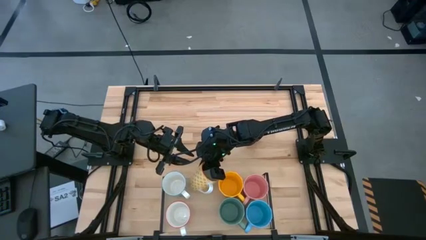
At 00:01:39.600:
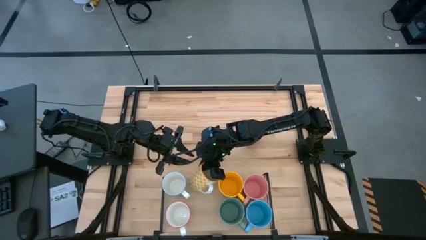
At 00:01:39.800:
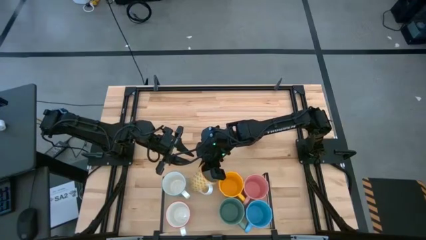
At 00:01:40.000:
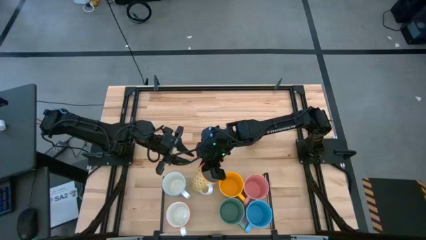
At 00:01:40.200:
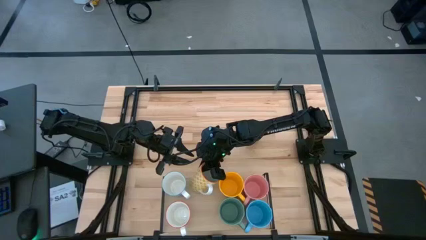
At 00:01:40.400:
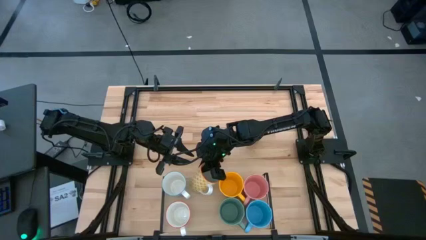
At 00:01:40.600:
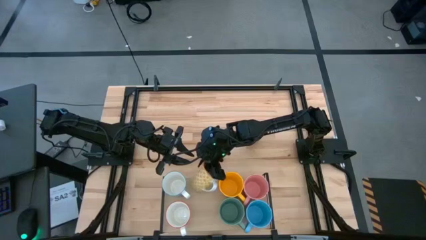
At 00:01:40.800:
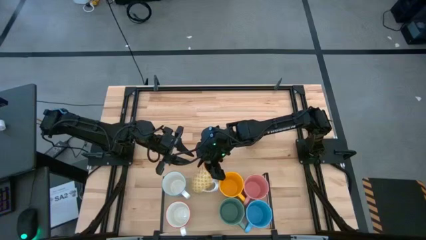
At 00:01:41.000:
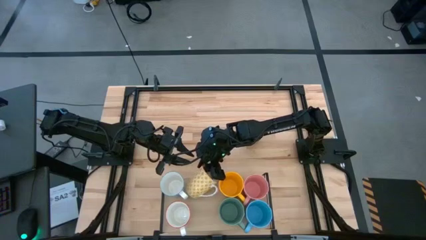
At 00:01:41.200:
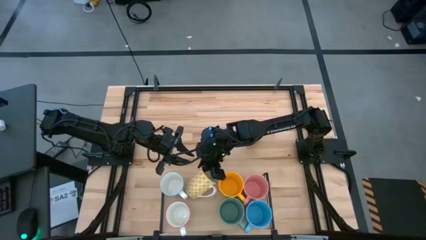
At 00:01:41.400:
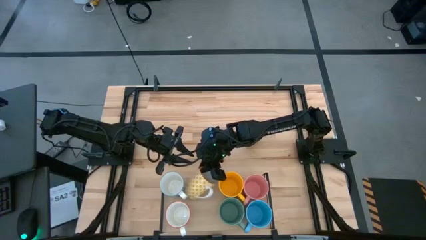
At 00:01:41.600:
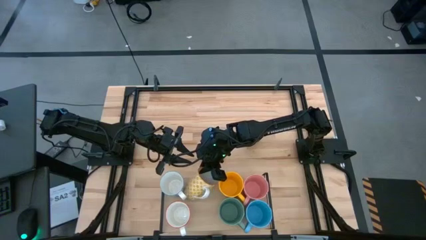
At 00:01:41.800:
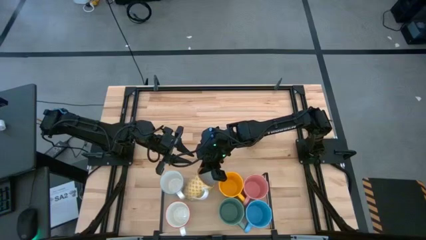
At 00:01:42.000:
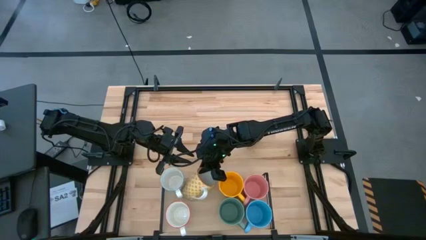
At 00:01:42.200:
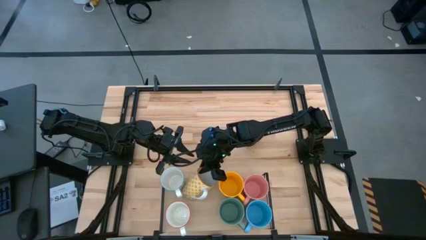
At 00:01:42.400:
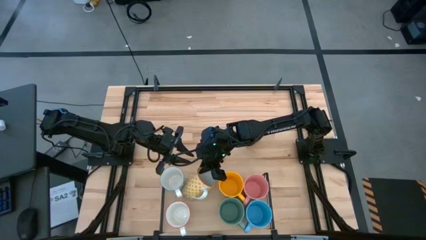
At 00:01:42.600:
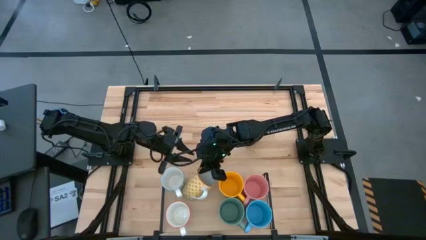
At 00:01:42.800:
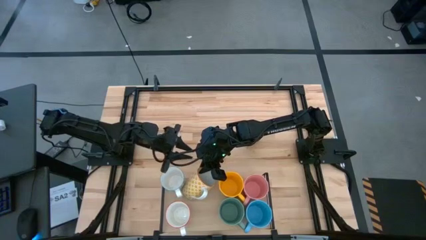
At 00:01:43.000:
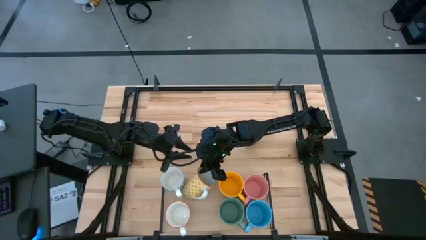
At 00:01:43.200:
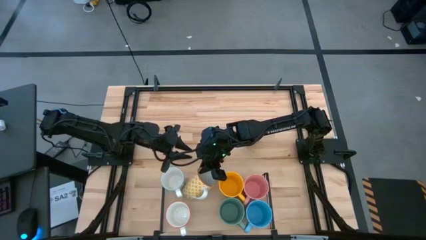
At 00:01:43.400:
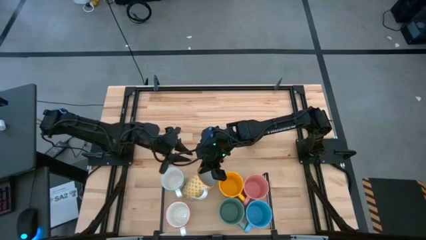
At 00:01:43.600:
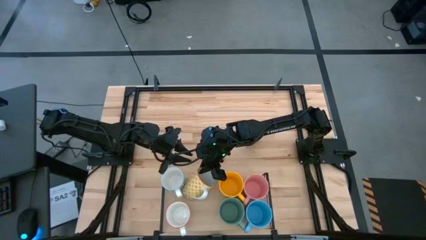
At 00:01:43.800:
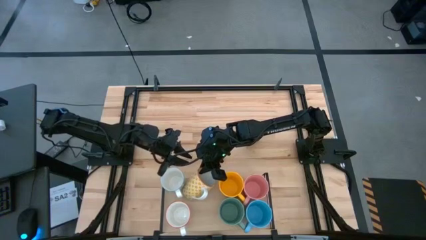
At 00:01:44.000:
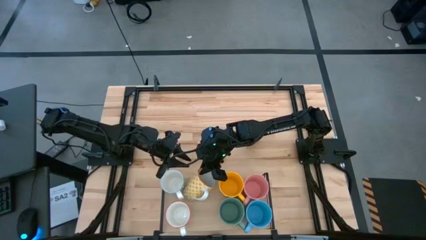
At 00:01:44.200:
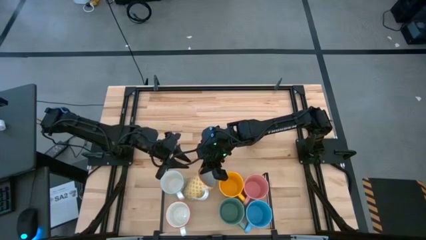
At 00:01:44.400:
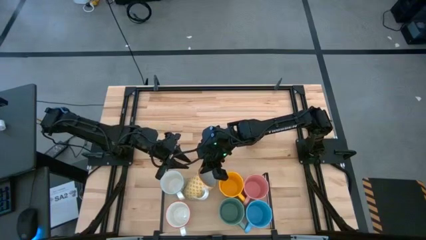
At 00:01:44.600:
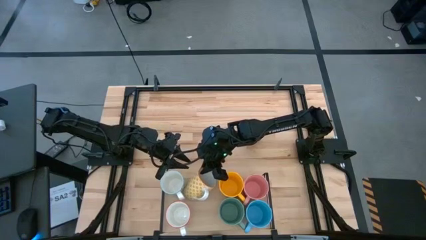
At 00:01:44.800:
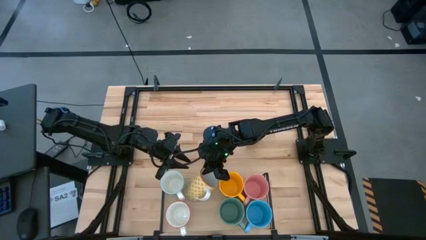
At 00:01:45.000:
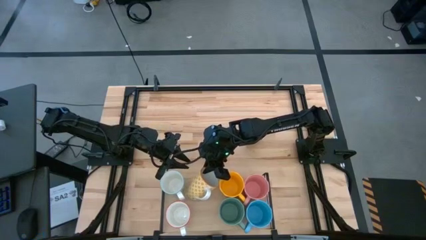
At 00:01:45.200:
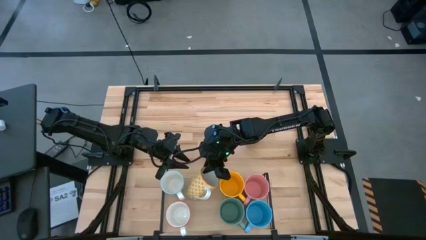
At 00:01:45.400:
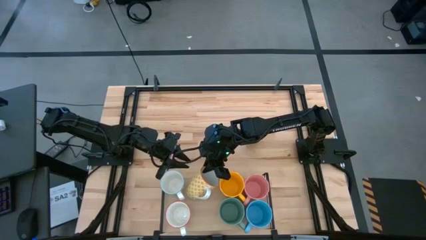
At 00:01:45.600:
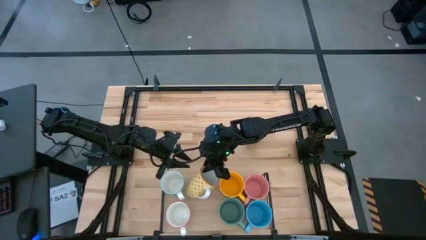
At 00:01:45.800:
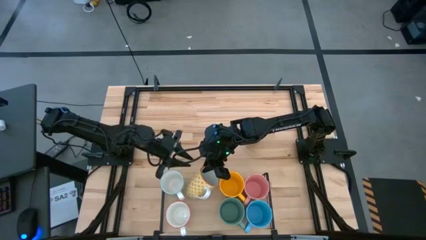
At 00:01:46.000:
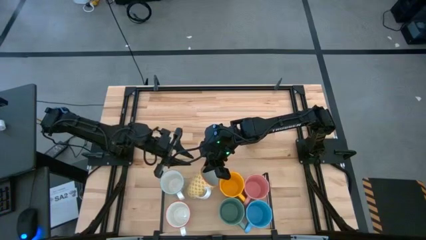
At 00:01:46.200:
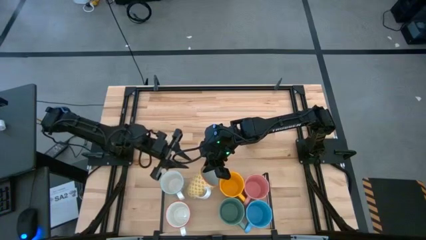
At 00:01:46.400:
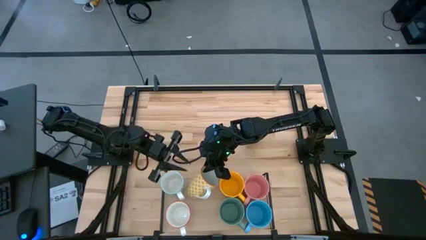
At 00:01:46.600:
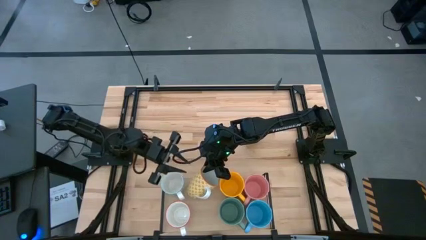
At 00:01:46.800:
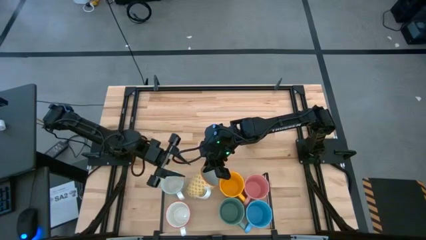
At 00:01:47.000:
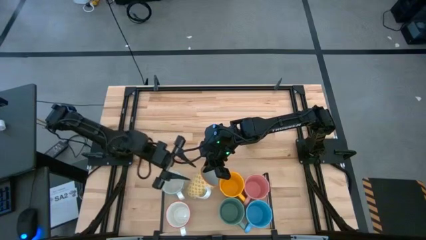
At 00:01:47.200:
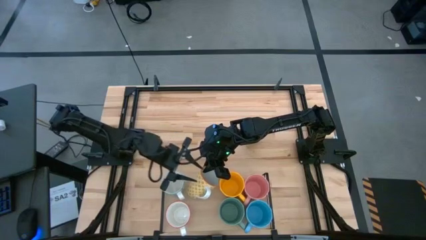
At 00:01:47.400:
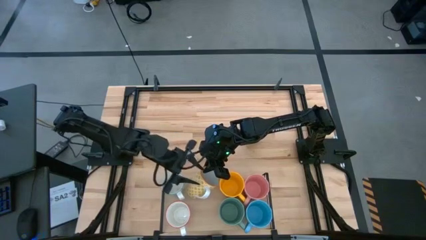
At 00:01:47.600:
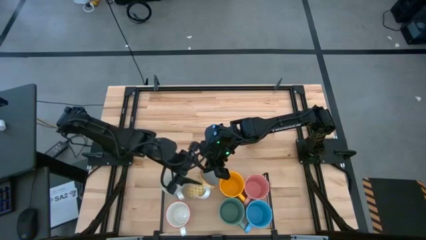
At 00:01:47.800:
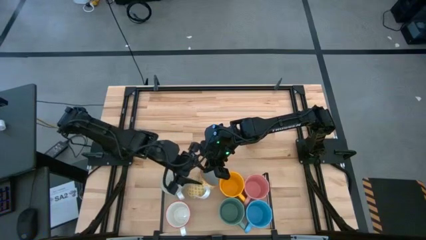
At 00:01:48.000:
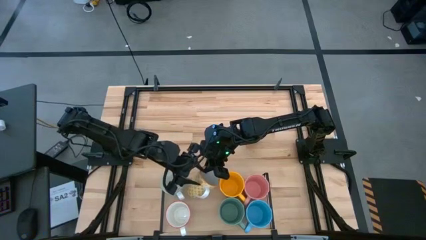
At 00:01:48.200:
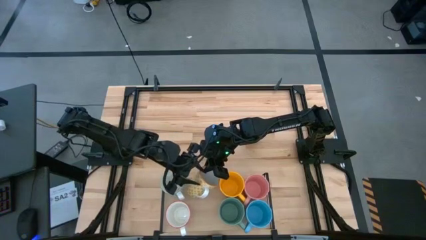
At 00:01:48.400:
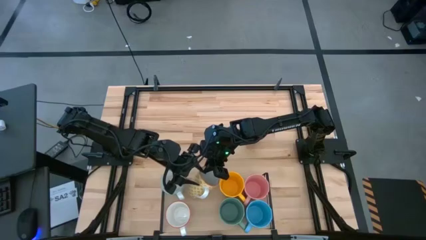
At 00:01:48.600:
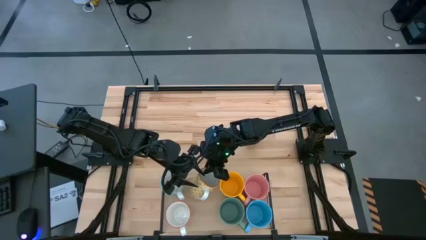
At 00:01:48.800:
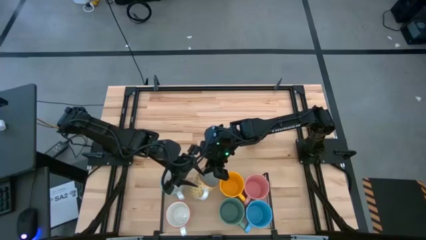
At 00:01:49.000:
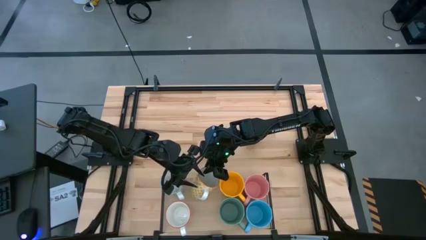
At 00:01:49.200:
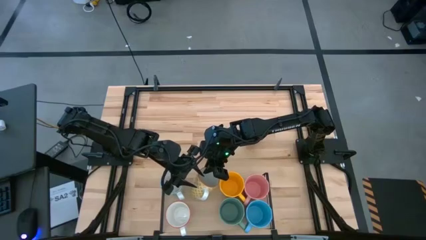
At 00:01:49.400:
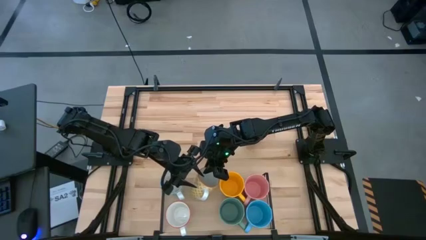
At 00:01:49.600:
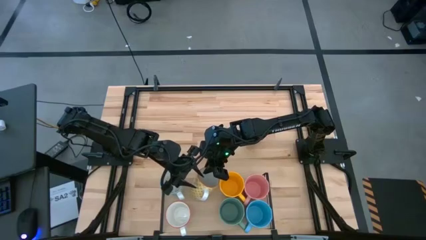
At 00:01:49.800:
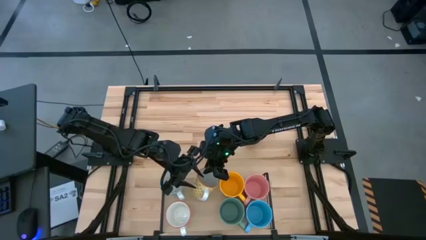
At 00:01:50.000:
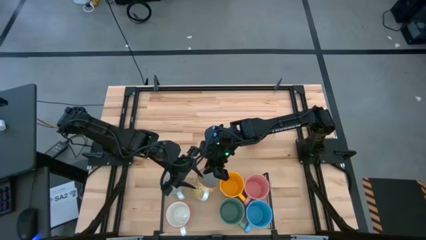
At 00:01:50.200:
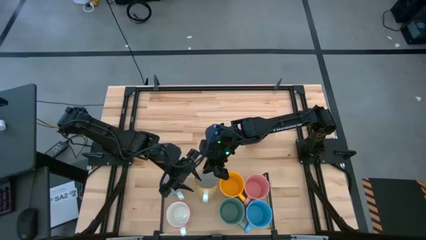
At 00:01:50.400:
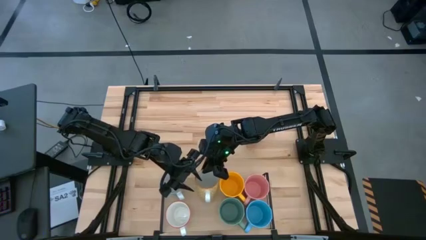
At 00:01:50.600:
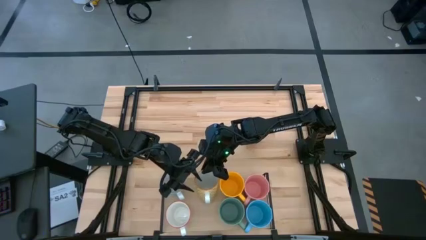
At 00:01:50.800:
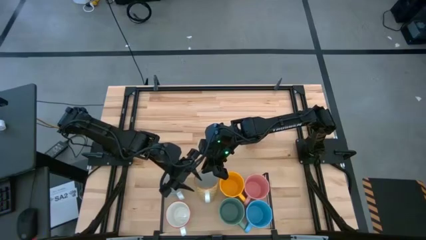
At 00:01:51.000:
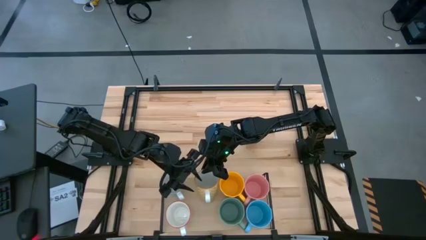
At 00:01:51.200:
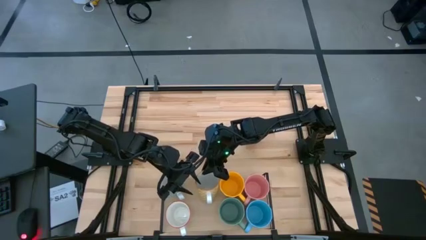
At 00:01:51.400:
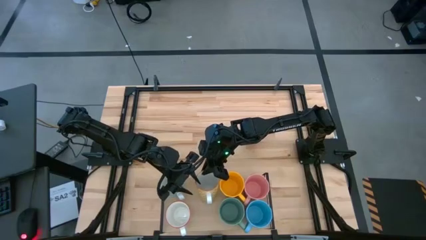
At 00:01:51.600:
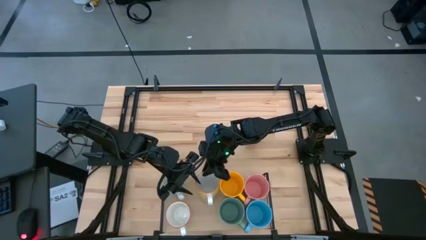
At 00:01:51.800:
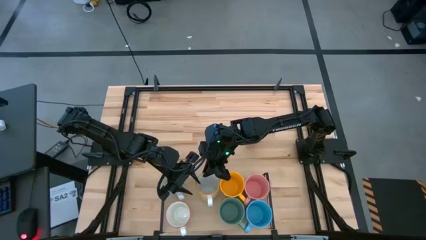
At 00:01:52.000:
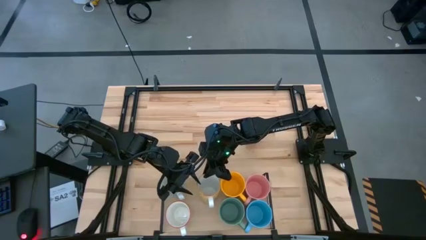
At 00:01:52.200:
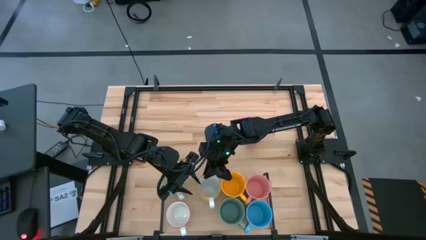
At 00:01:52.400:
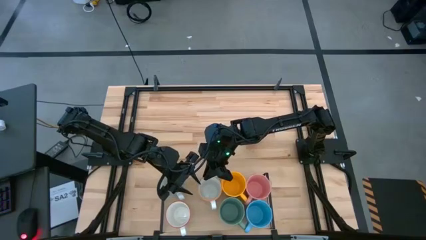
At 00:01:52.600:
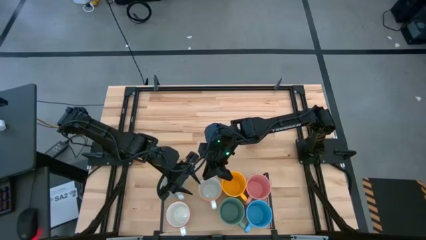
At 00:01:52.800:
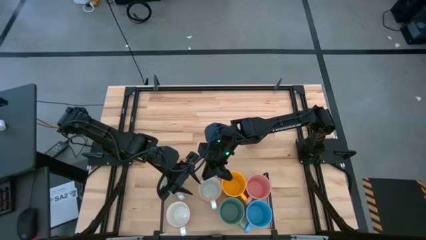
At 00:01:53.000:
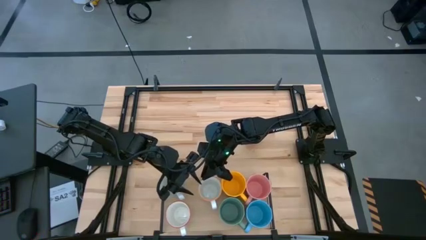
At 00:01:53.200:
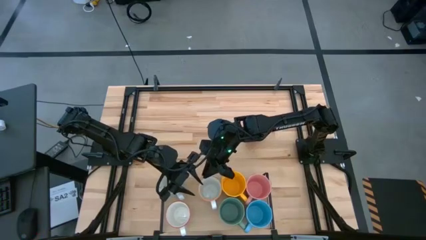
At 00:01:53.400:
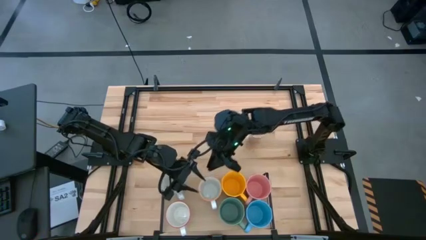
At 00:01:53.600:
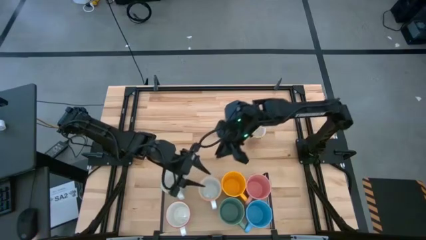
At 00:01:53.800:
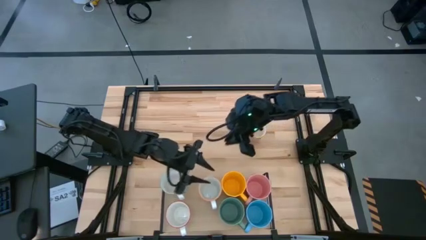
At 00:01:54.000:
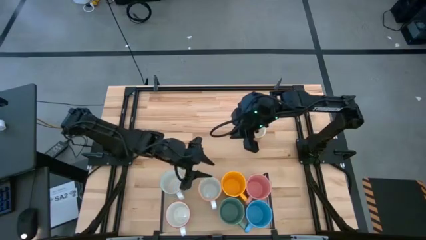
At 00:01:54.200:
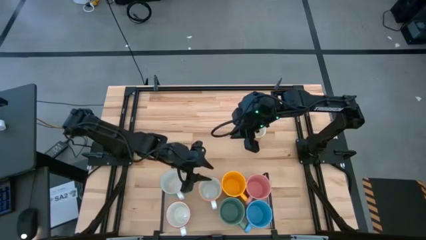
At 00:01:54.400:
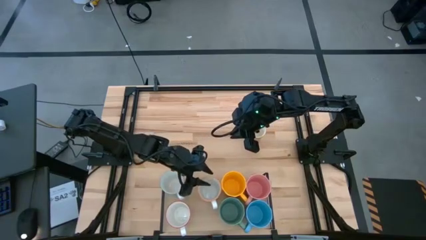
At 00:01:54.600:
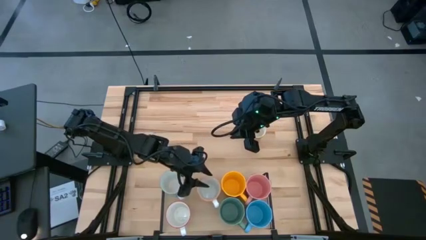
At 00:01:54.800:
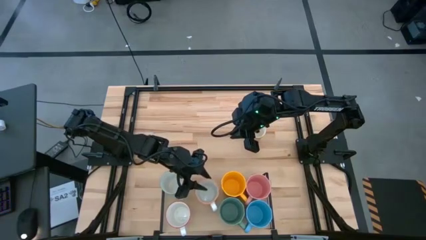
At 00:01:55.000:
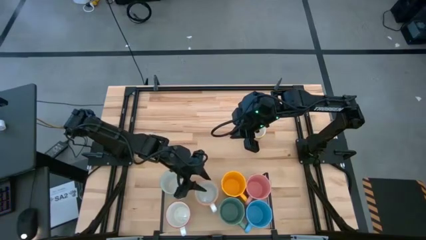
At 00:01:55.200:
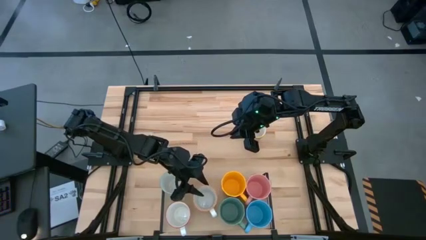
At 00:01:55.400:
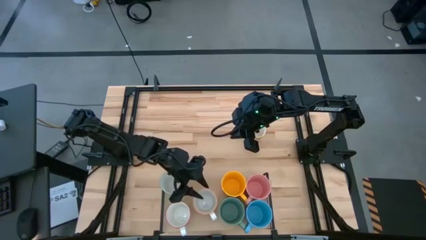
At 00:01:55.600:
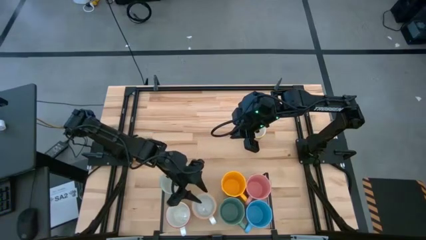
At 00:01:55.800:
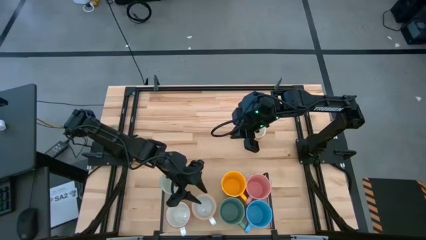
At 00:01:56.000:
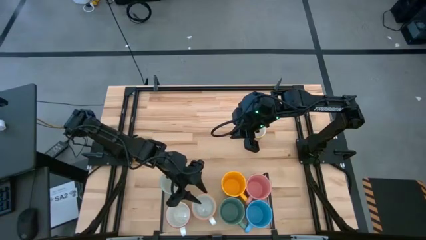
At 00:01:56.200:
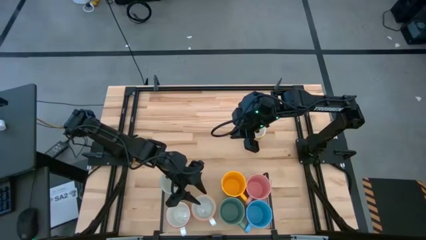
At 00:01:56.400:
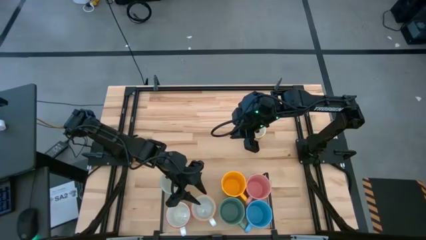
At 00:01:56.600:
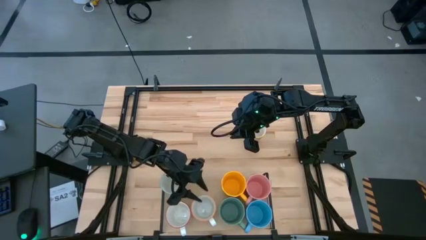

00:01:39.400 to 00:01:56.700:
Task: Place coffee mugs
Put the light yellow rim mug on the shelf
